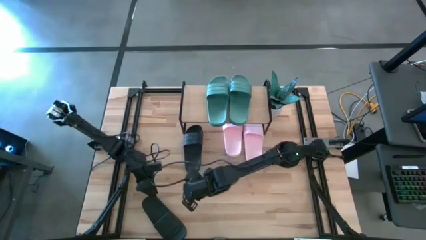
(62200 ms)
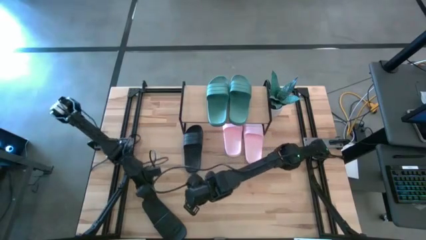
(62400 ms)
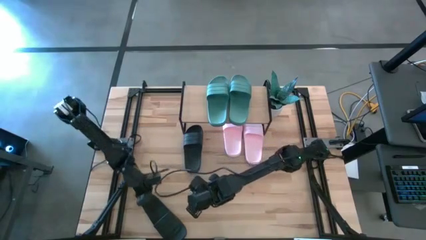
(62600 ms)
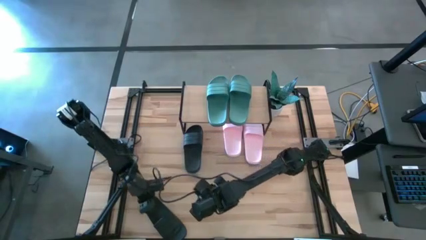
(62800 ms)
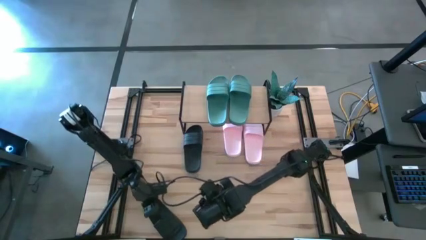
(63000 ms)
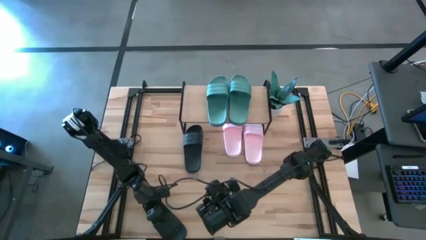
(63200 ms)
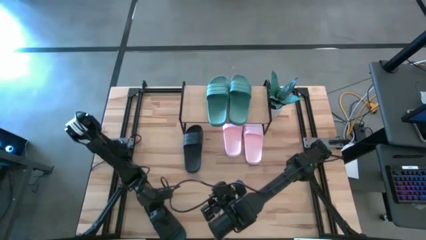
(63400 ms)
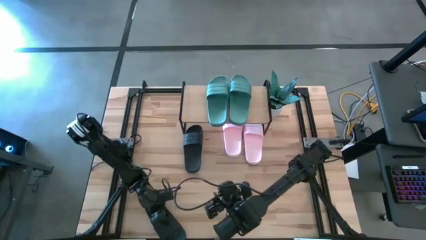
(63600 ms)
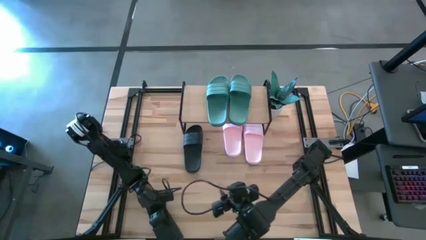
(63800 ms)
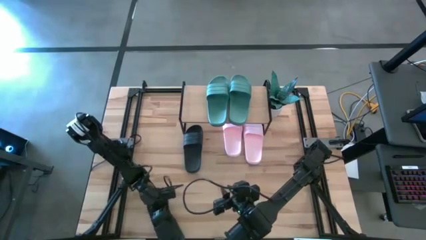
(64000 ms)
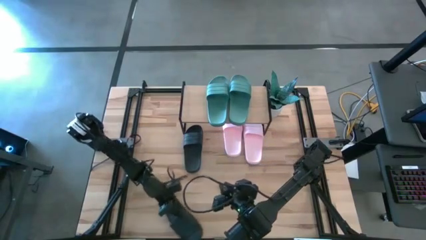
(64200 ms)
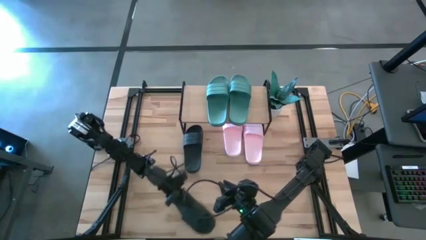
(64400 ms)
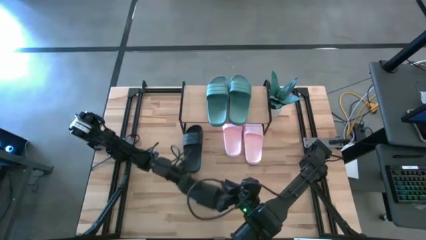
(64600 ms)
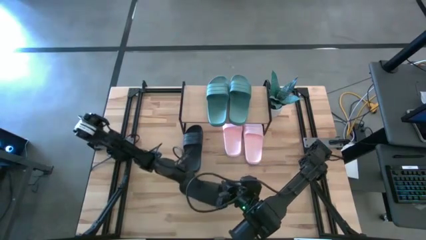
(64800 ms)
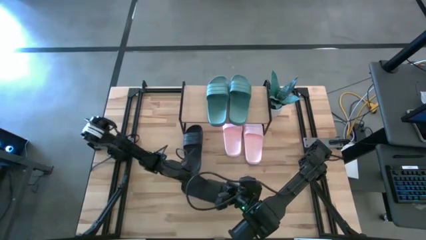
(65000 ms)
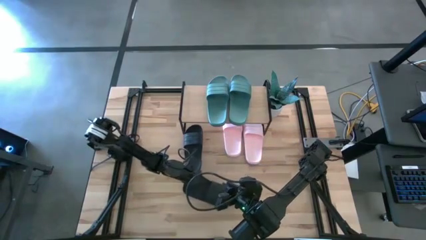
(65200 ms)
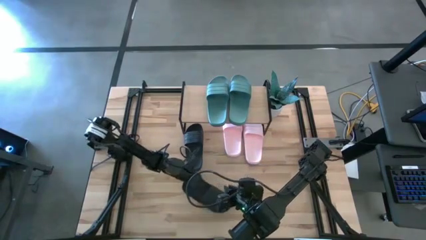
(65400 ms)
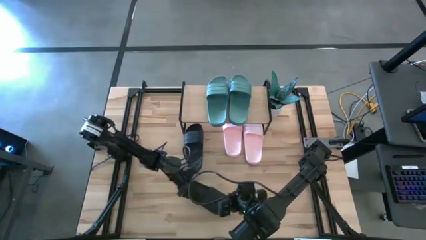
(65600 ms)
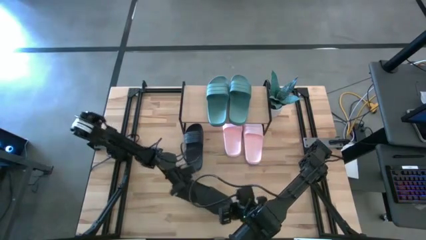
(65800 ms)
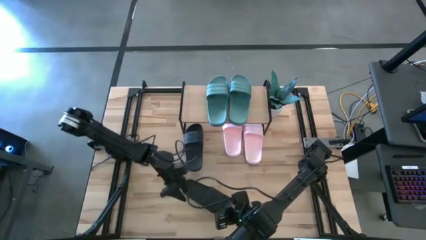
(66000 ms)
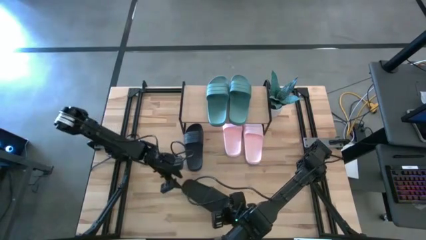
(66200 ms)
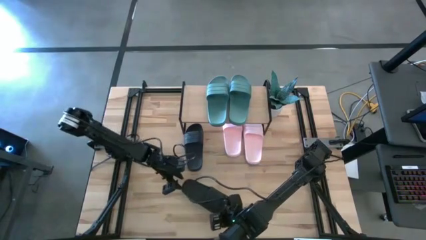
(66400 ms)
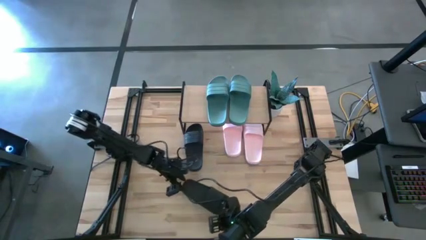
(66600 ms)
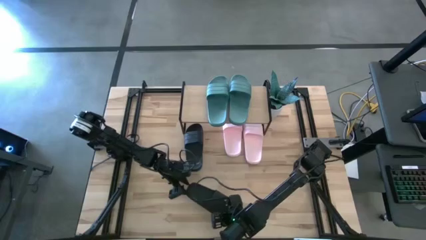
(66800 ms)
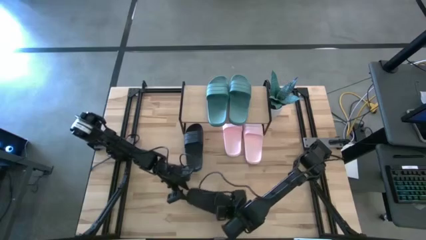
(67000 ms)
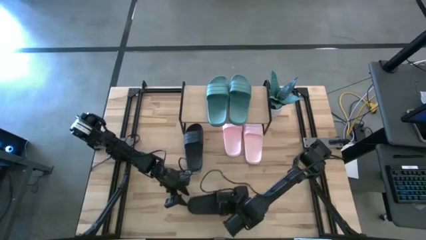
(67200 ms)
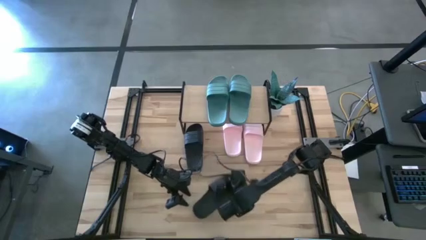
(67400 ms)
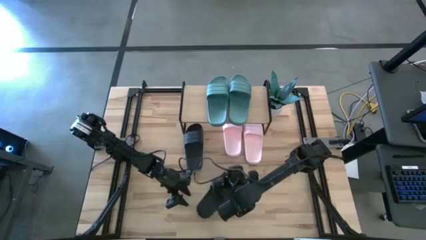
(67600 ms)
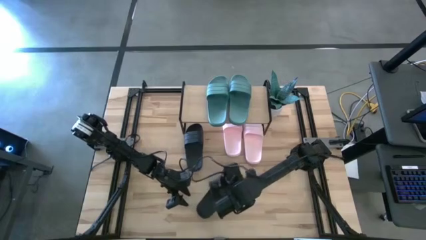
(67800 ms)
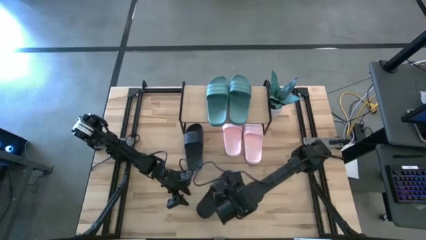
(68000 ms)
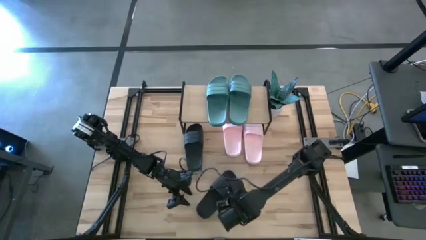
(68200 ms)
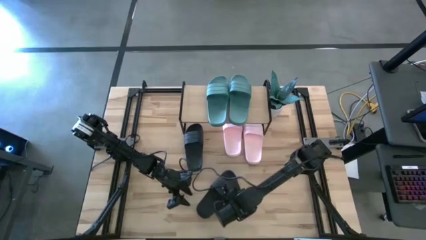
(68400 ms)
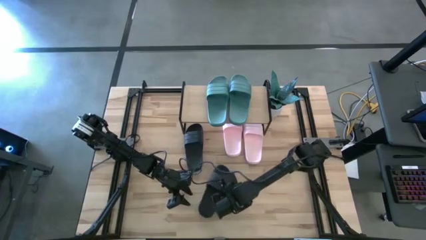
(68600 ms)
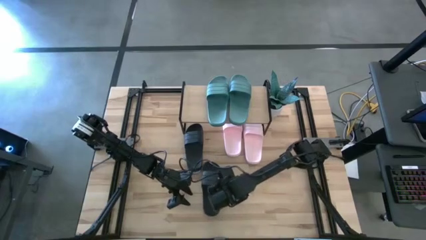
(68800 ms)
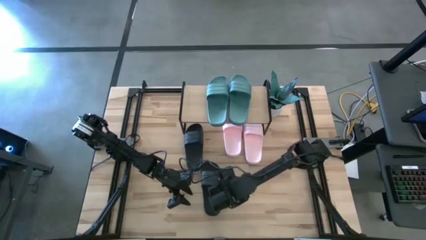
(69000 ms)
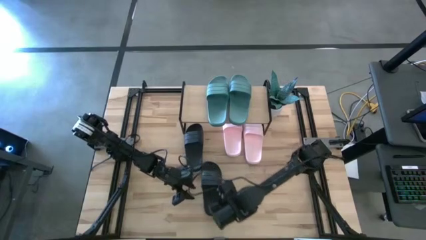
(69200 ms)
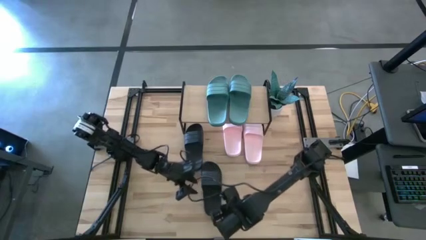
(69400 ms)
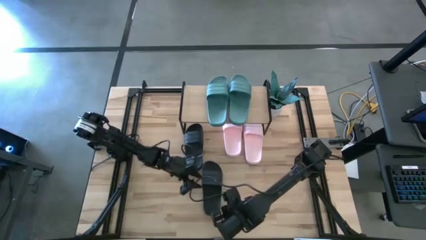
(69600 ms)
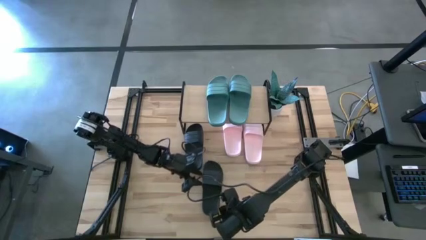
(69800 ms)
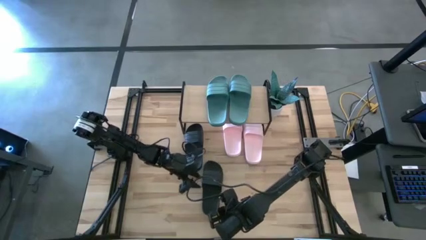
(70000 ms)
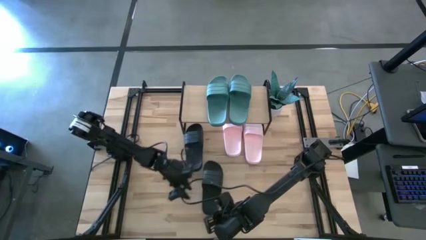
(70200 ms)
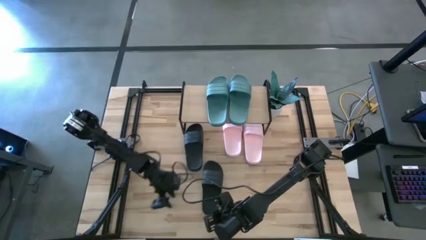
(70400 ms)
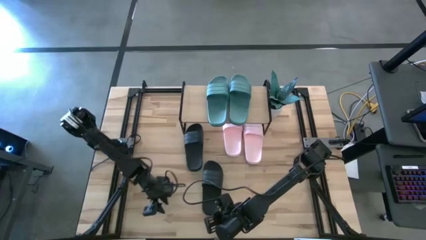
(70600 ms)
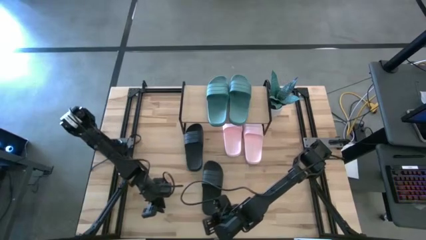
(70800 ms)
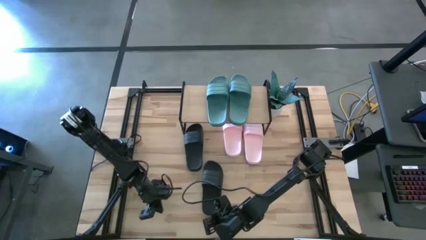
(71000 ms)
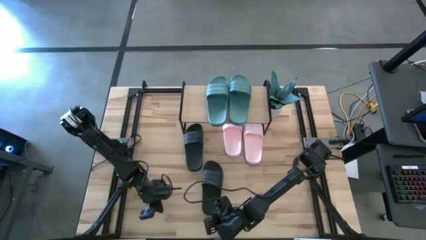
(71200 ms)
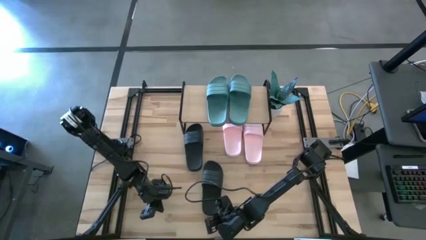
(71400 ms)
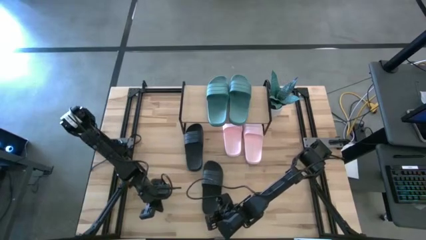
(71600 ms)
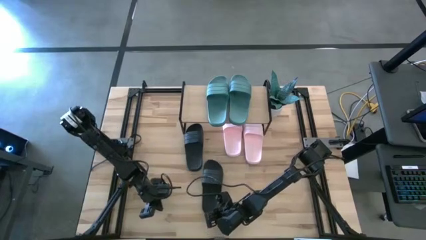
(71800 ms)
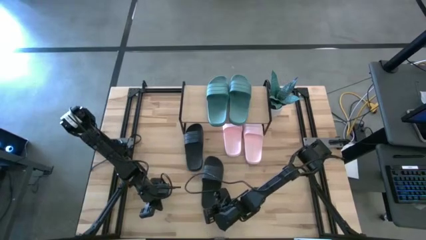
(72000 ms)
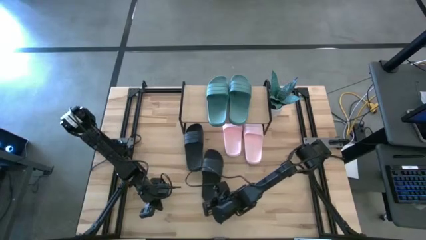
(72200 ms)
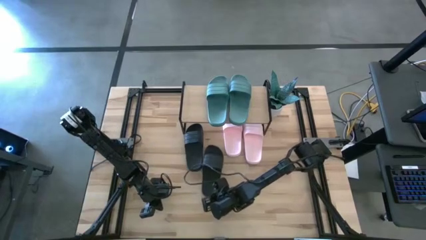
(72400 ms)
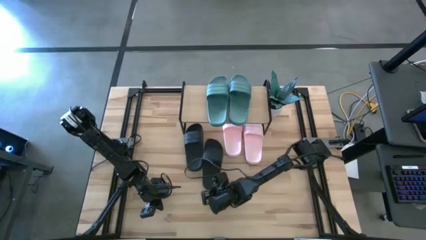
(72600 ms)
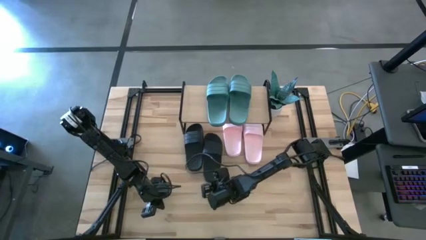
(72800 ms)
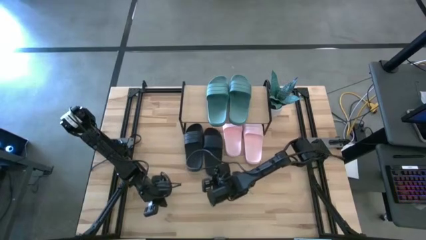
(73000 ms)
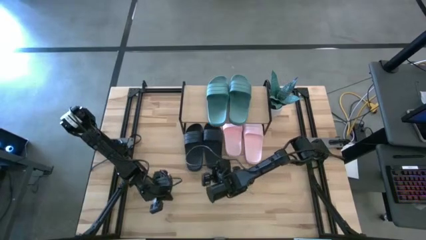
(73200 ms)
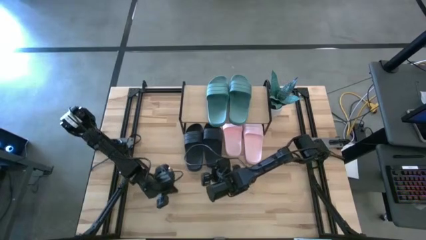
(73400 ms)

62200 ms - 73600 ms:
Task: Pick and place slides into the shelf
Prepare the black pair of slides
